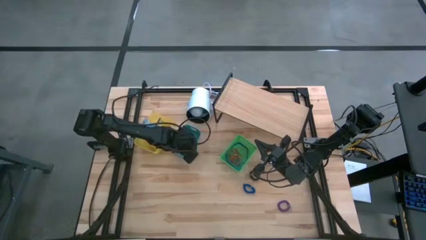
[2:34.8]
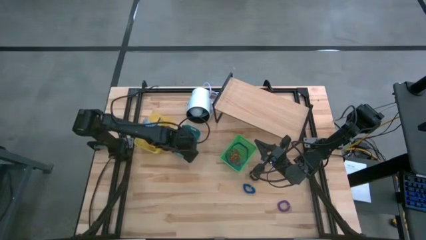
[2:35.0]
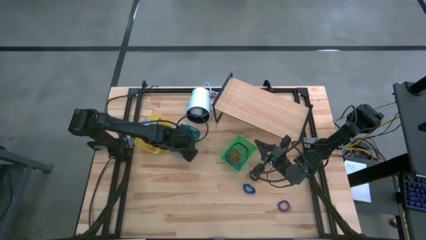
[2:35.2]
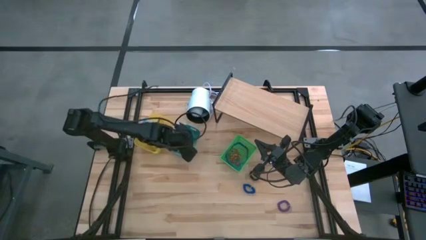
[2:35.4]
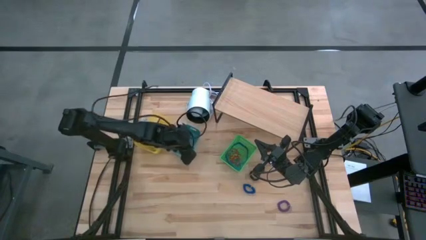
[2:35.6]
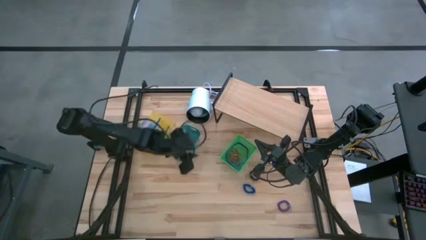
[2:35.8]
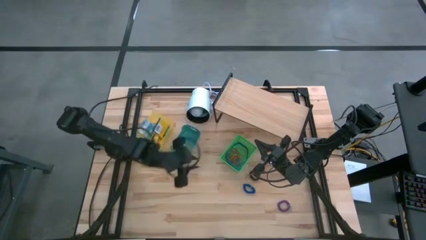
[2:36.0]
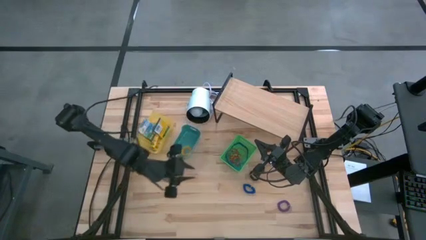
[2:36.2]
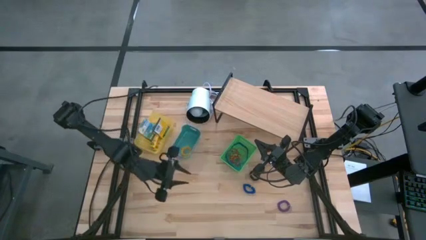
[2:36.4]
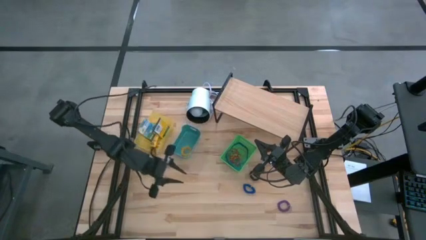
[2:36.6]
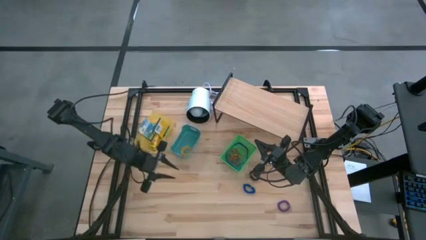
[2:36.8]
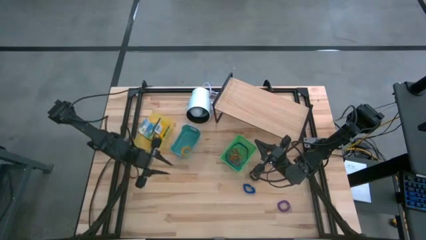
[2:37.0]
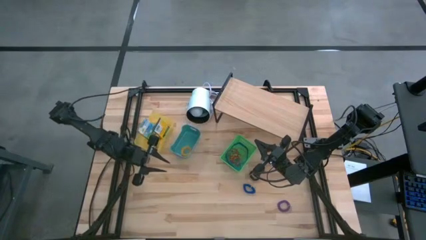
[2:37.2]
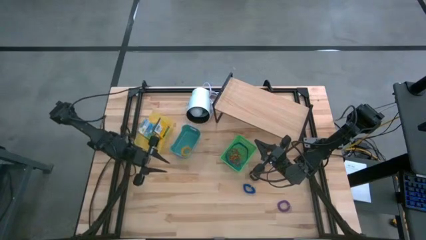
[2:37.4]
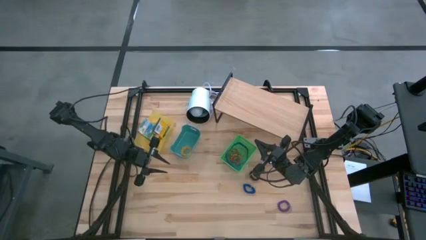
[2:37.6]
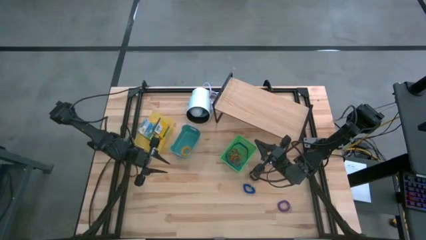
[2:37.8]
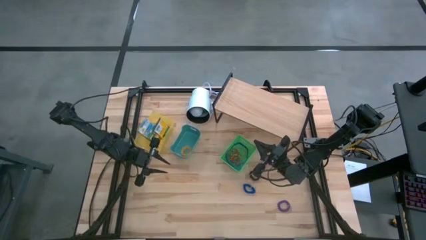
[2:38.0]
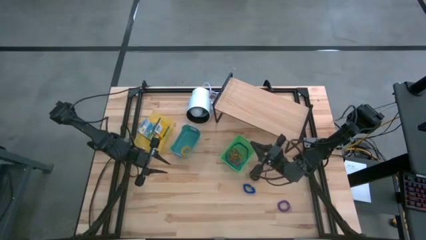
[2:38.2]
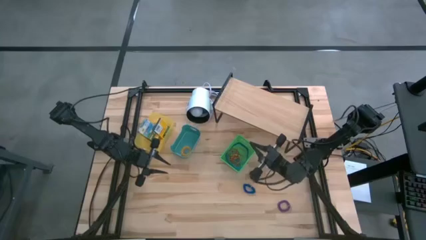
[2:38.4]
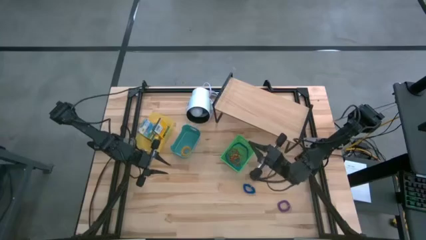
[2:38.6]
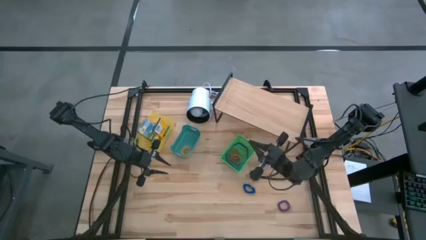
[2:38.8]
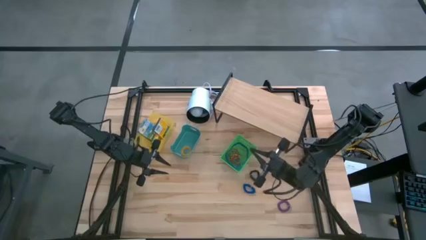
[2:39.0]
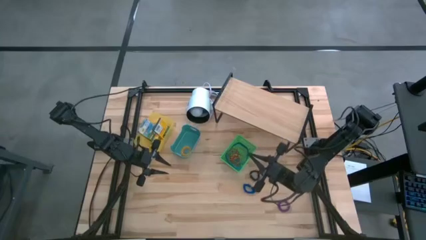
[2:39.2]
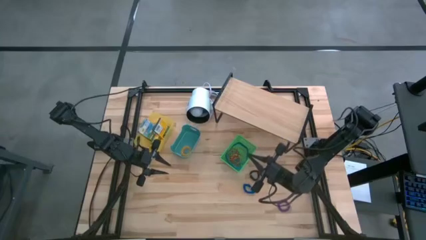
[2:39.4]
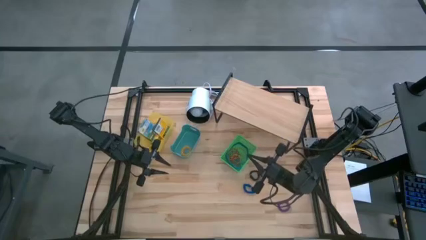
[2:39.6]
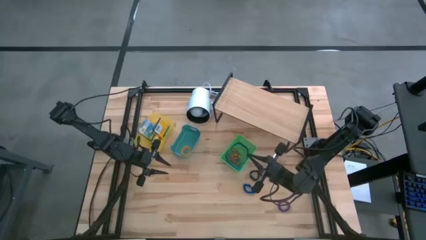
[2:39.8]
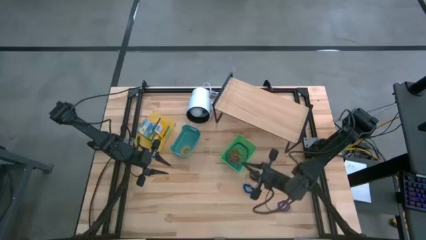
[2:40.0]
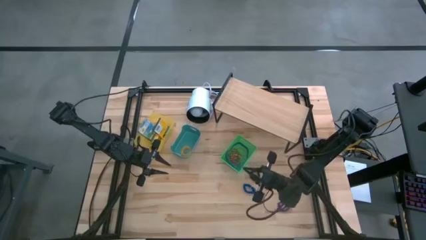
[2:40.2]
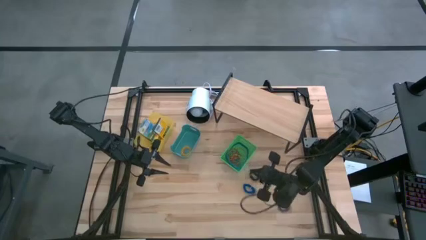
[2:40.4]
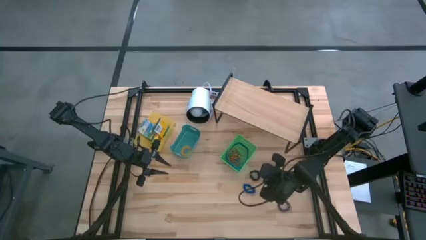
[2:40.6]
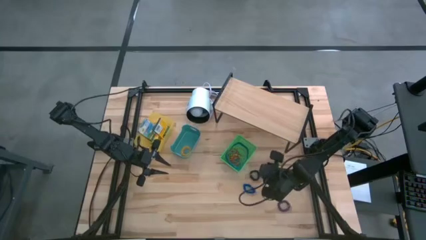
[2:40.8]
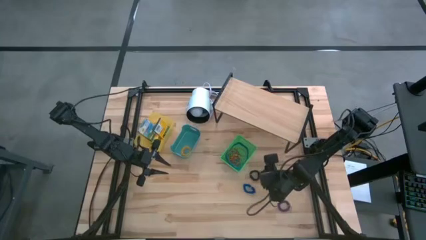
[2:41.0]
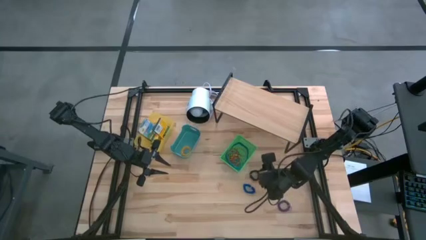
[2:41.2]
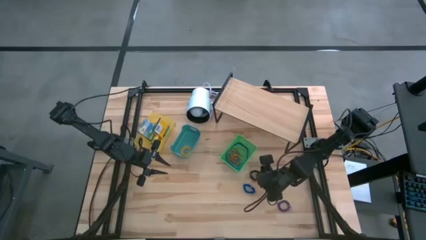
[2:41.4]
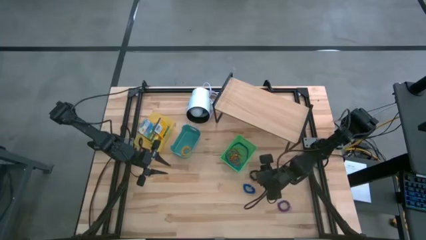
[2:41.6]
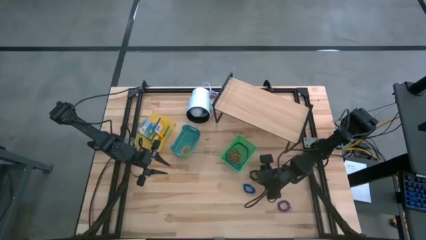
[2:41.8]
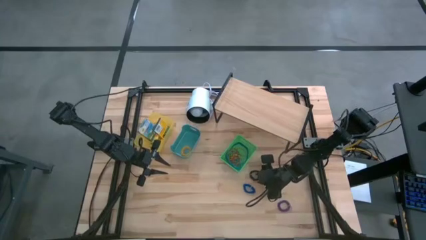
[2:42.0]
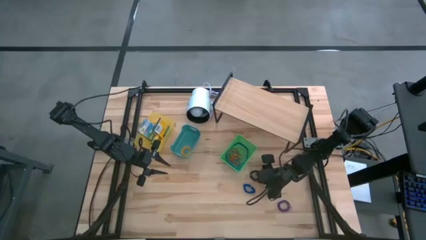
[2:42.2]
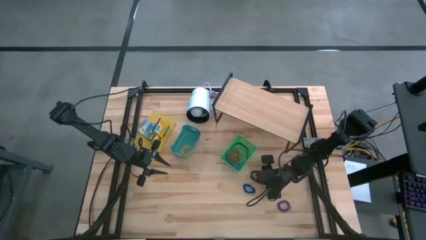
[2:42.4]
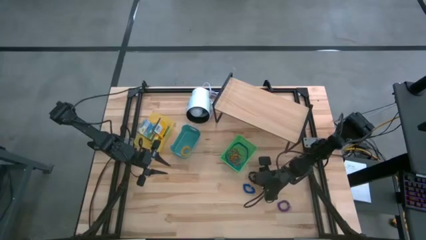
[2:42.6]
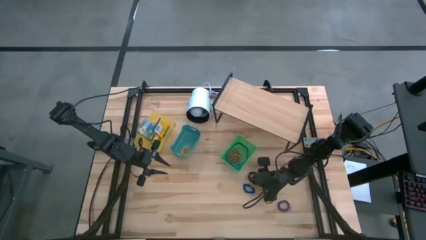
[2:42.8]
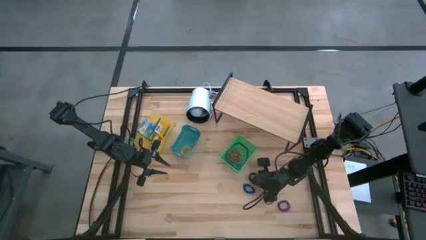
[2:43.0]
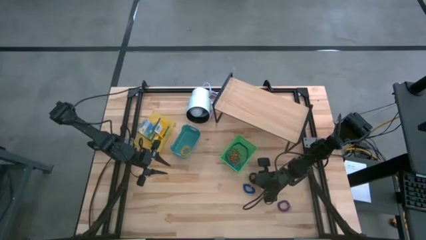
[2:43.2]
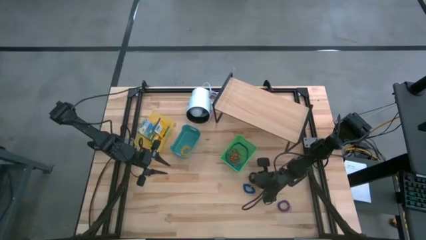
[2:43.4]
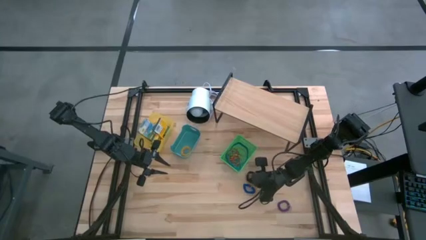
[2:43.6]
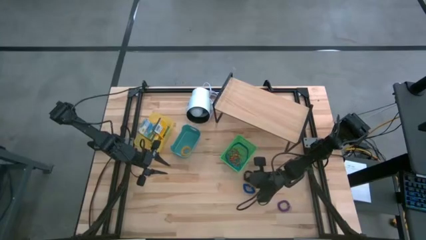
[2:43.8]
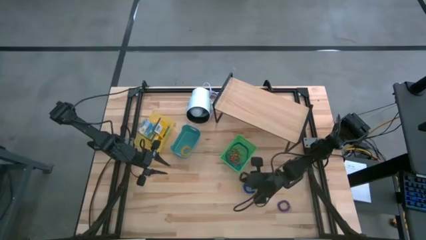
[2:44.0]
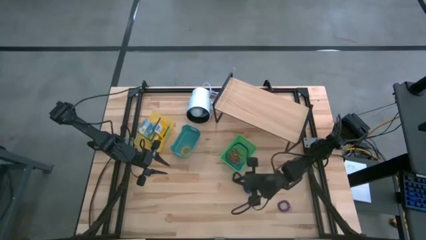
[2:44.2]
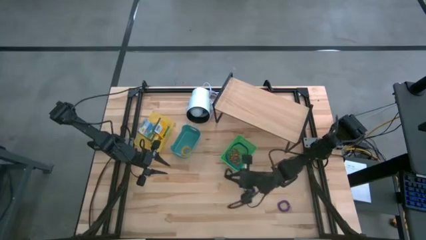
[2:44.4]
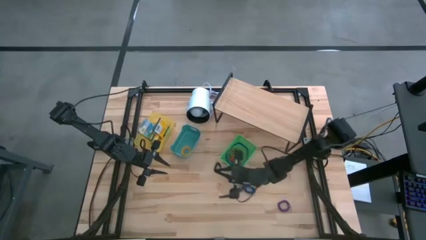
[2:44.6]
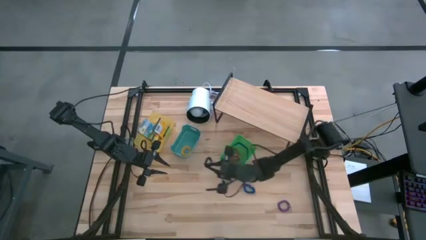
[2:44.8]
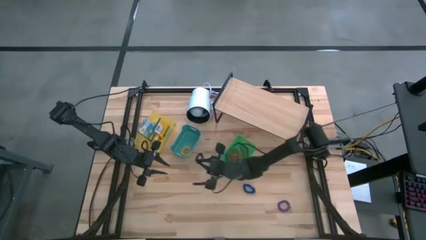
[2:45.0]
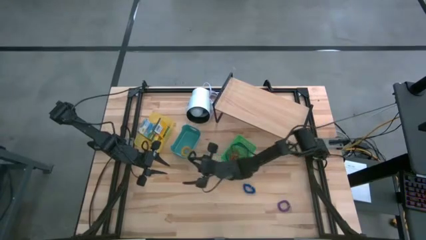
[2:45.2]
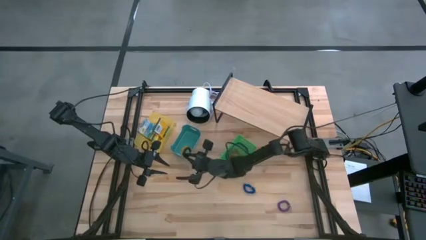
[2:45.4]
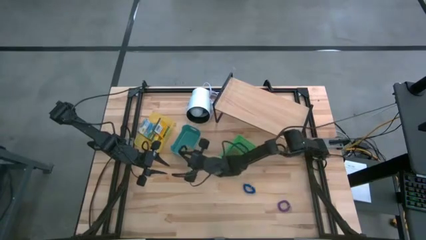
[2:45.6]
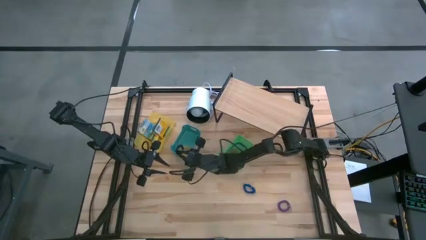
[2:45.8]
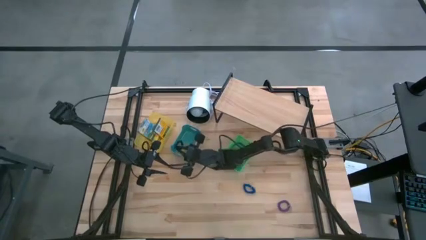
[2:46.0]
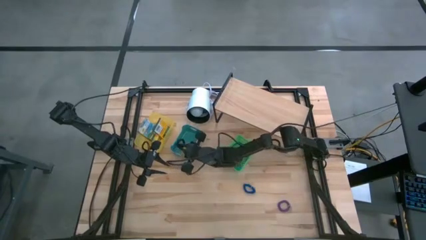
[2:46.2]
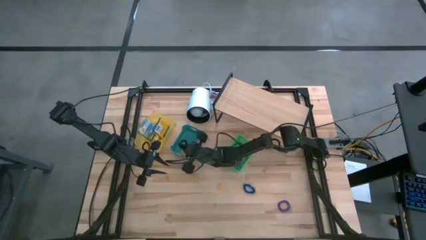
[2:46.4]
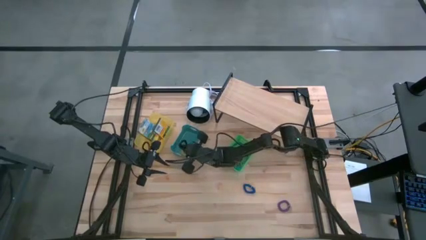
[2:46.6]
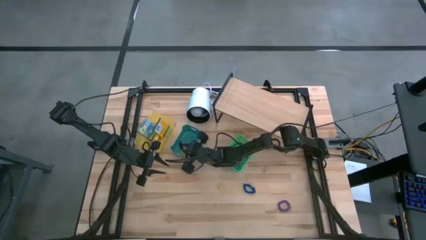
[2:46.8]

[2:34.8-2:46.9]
Task: Pick & Place Office Desk Supplies
Put the black spring keychain into the blue bin

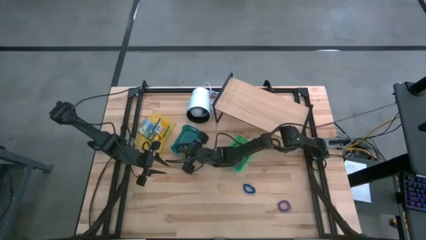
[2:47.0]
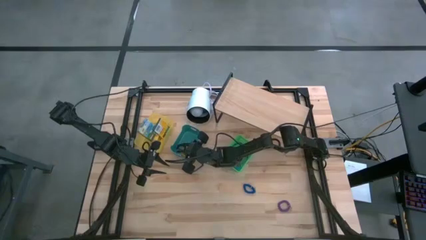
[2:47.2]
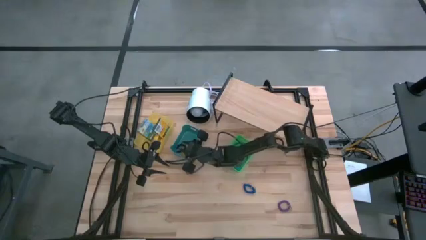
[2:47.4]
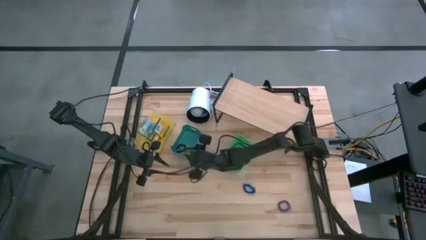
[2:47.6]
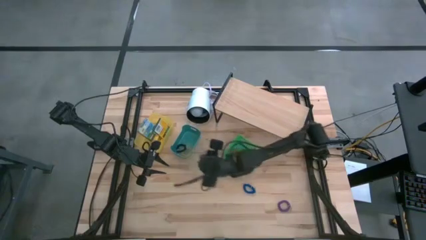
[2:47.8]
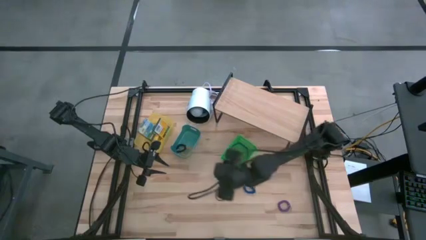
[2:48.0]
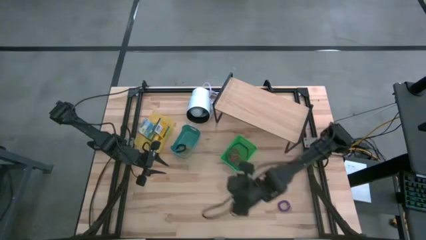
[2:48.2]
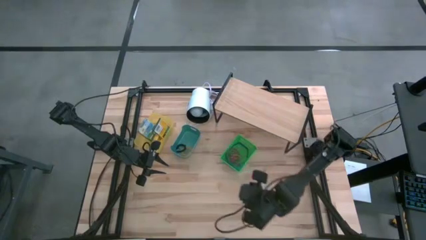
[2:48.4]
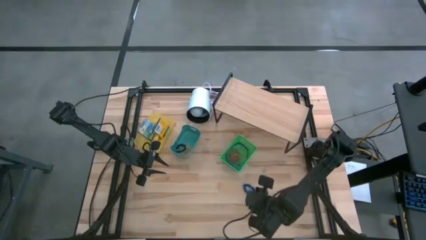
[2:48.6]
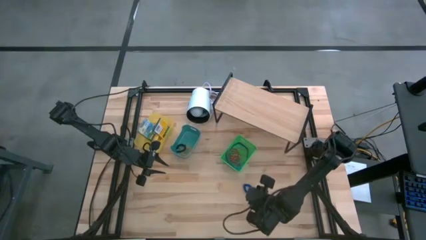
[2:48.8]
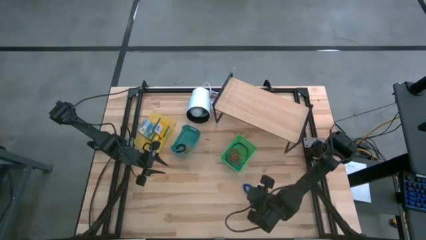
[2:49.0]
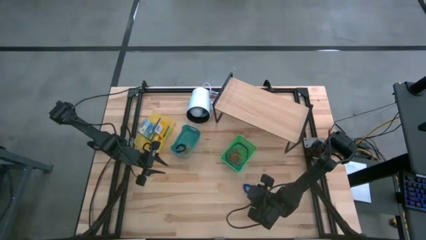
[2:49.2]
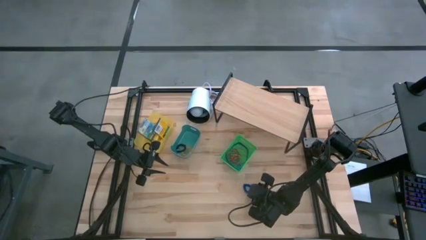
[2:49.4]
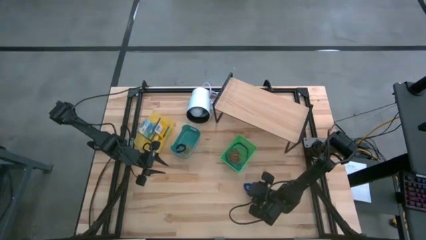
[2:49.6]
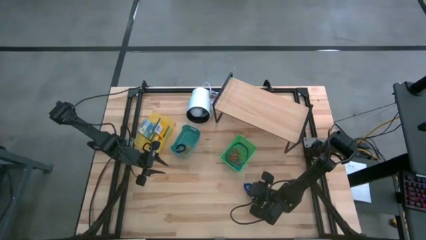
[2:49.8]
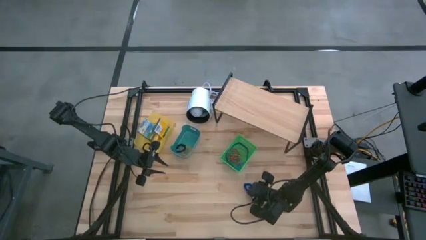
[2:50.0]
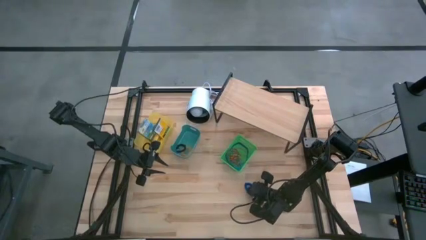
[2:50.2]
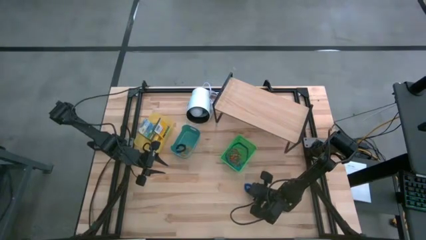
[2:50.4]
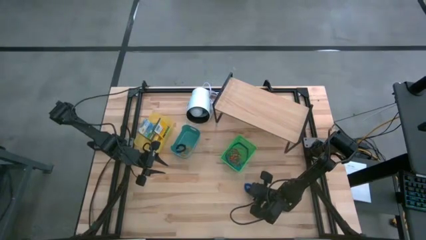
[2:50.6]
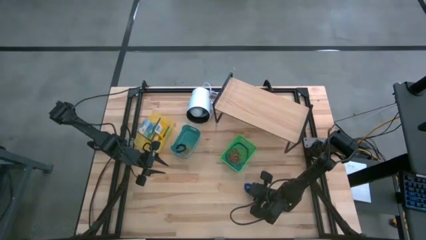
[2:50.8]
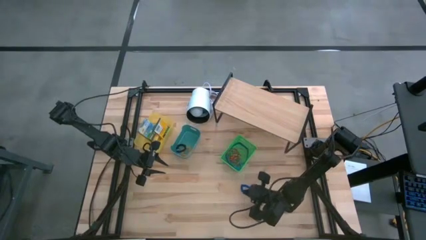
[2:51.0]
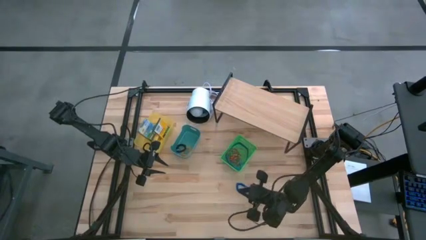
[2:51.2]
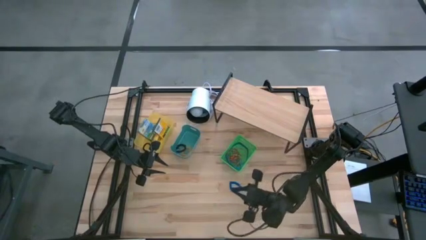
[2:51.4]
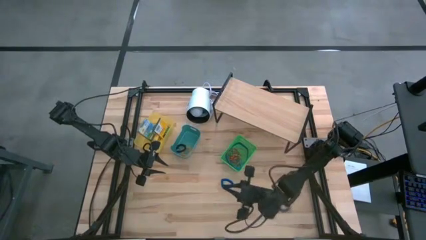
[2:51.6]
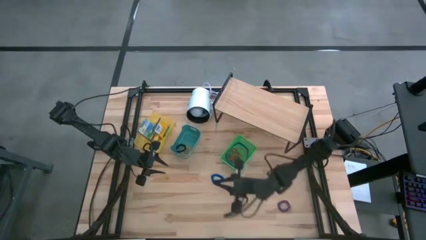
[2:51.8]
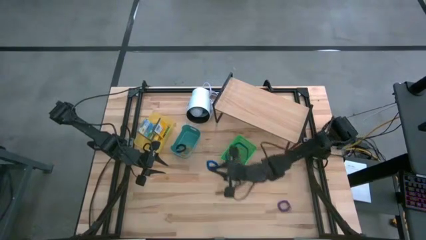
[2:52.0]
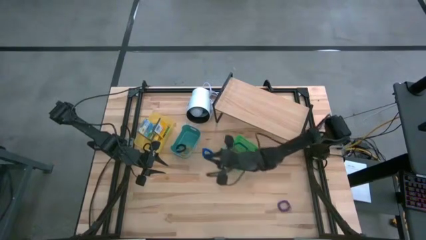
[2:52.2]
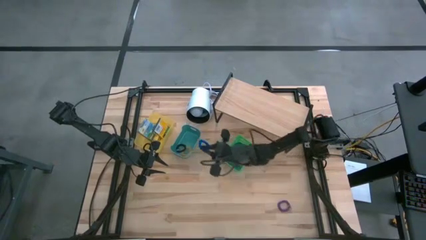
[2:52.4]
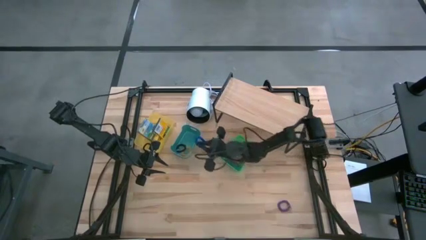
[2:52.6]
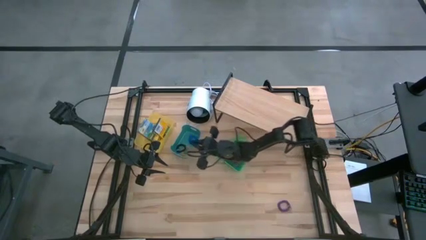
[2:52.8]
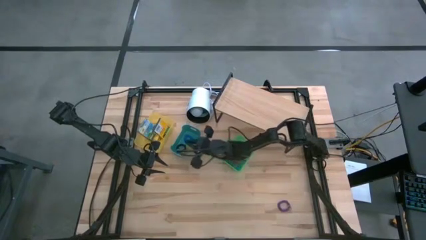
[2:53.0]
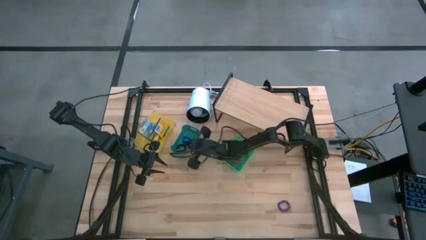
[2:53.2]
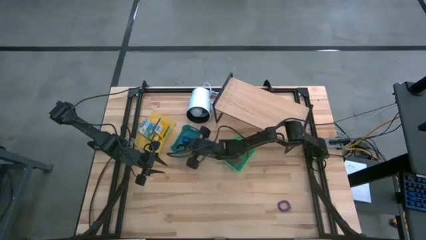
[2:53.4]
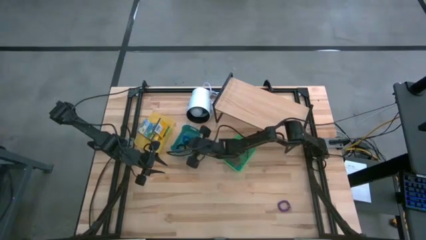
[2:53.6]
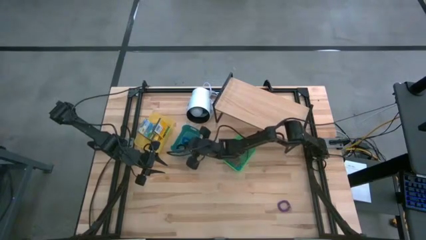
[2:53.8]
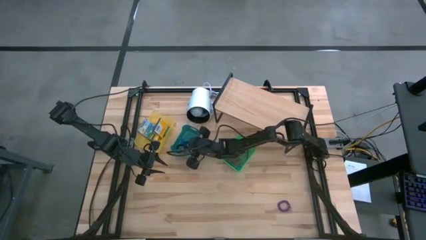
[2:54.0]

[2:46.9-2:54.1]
Put the blue spring keychain into the blue bin
